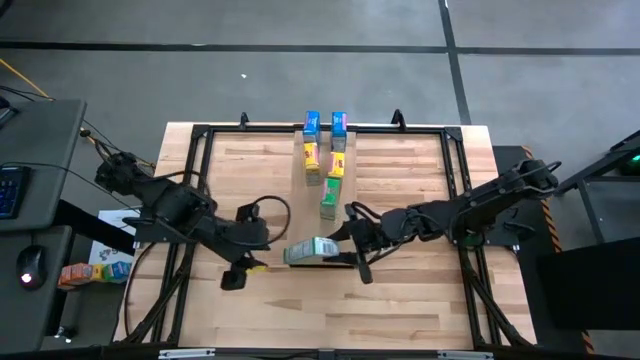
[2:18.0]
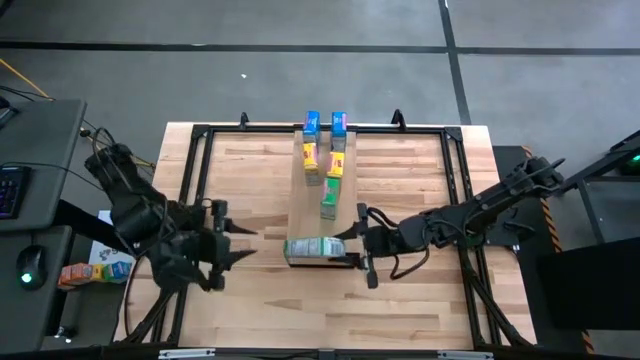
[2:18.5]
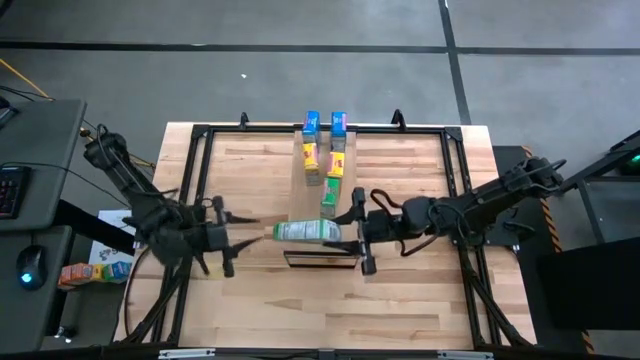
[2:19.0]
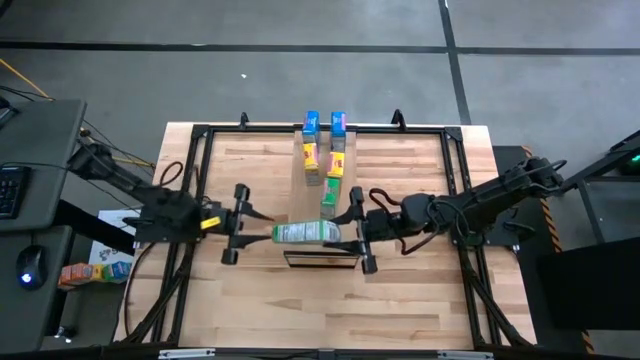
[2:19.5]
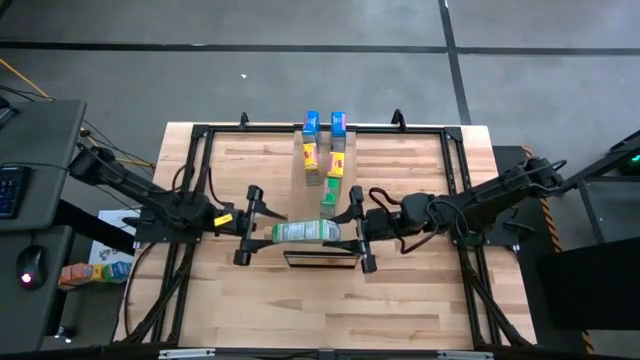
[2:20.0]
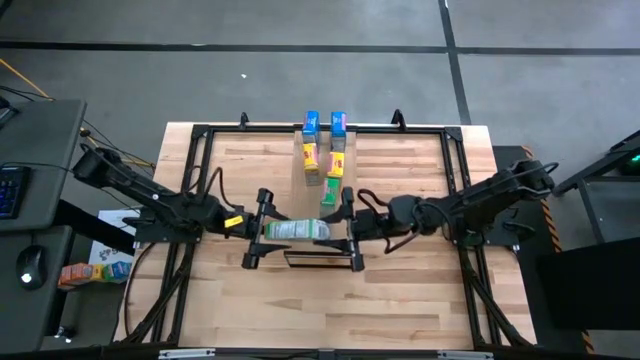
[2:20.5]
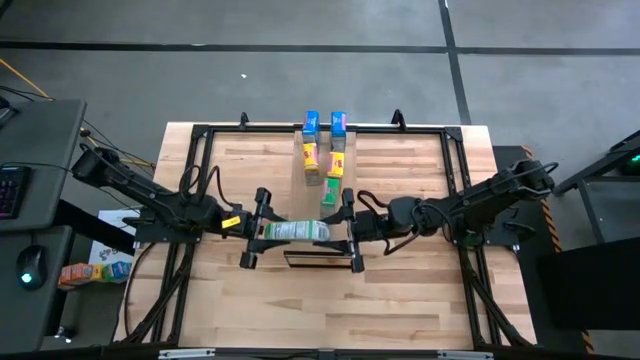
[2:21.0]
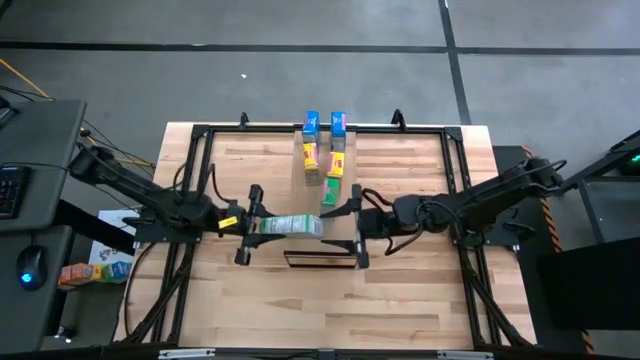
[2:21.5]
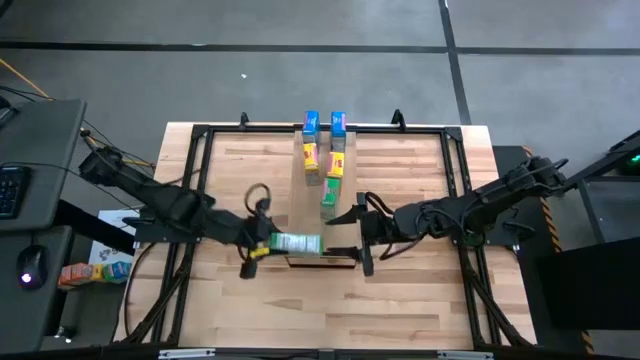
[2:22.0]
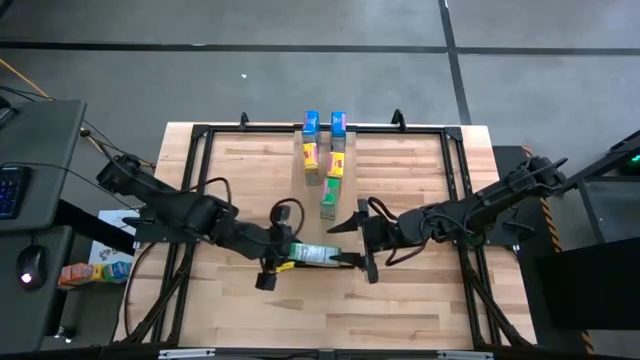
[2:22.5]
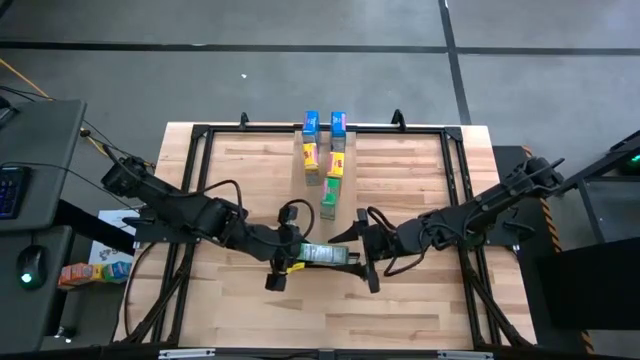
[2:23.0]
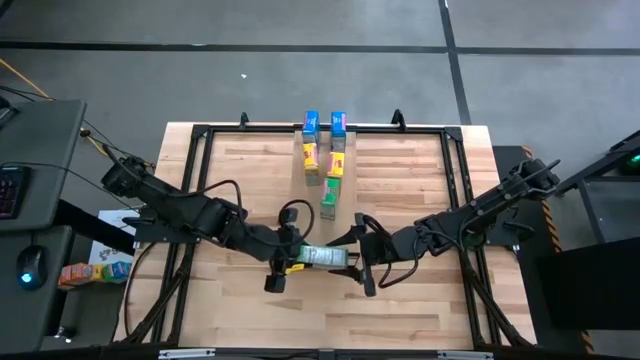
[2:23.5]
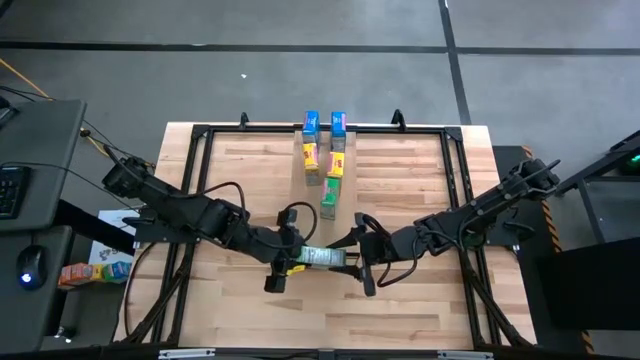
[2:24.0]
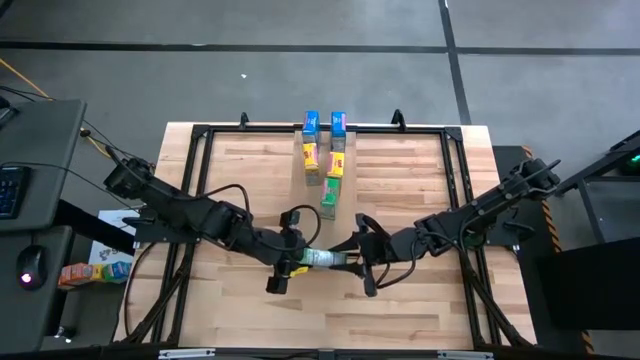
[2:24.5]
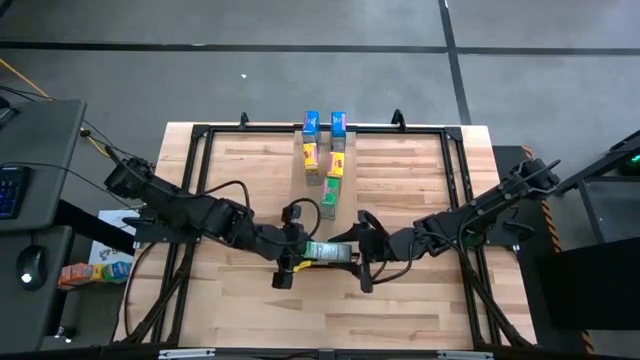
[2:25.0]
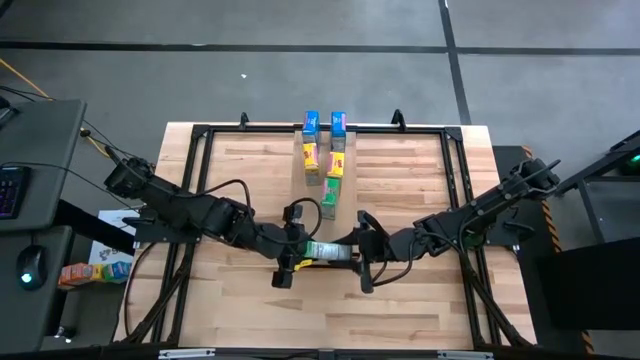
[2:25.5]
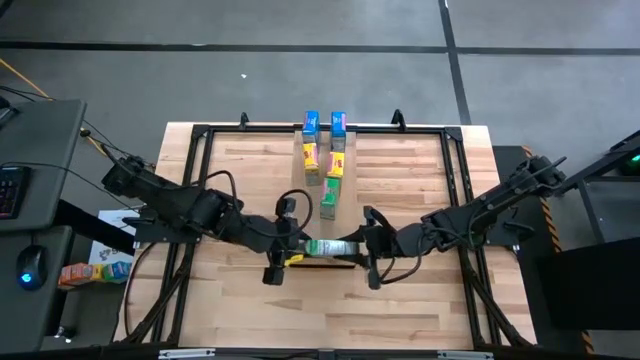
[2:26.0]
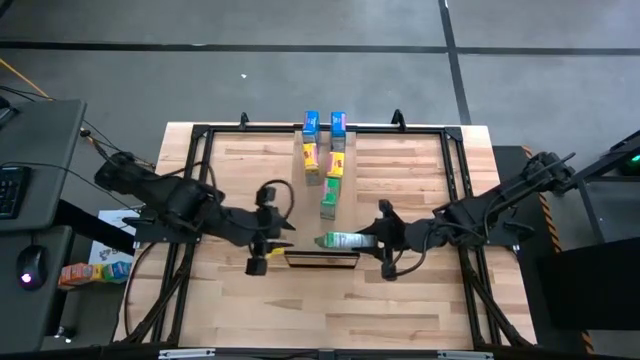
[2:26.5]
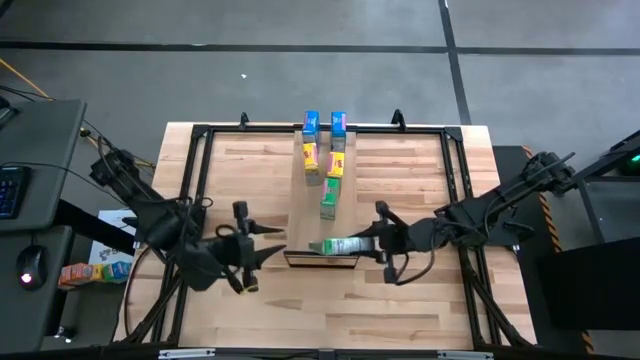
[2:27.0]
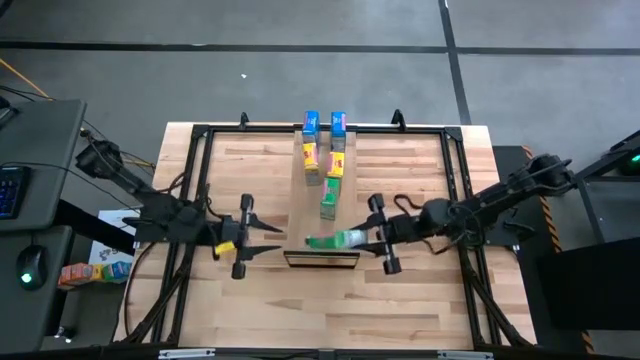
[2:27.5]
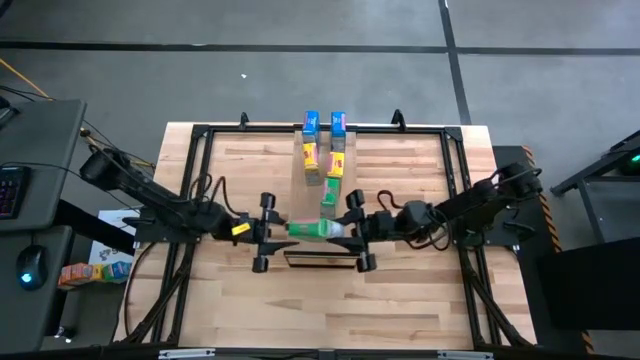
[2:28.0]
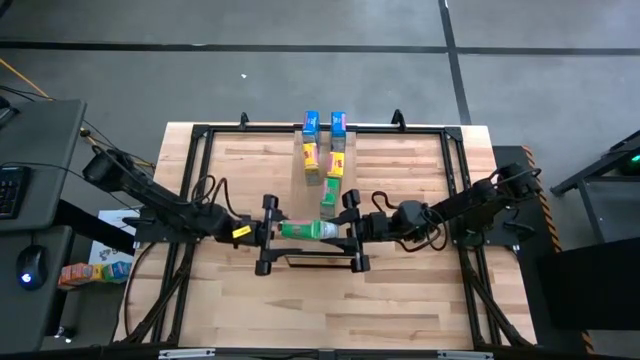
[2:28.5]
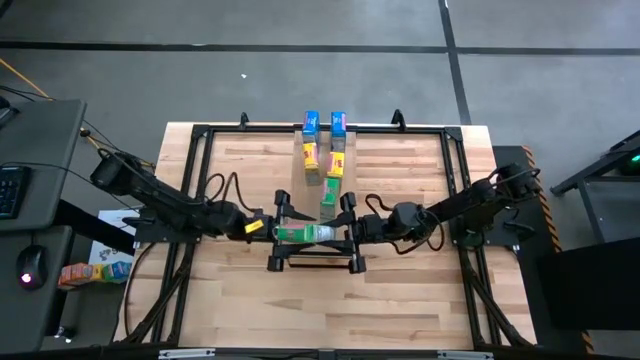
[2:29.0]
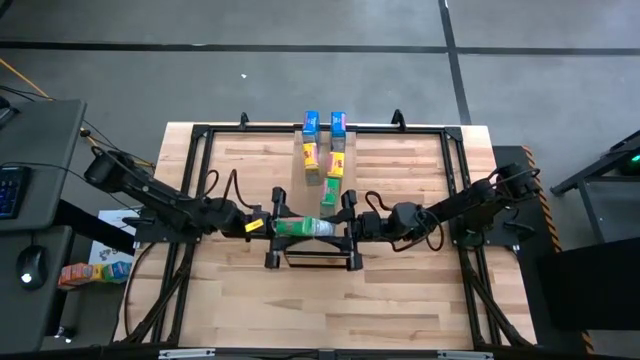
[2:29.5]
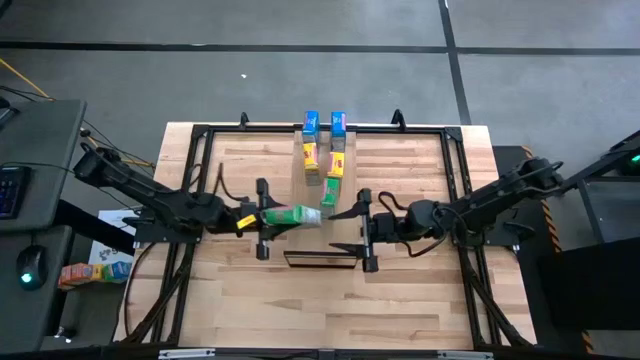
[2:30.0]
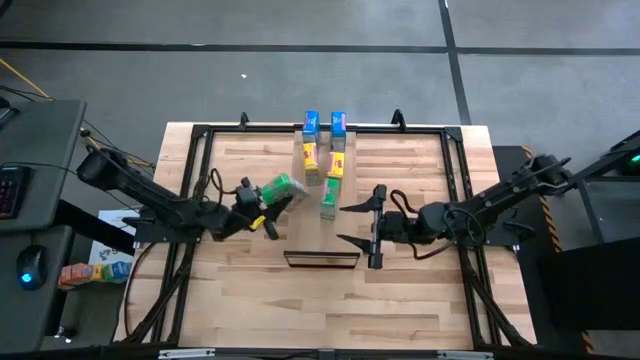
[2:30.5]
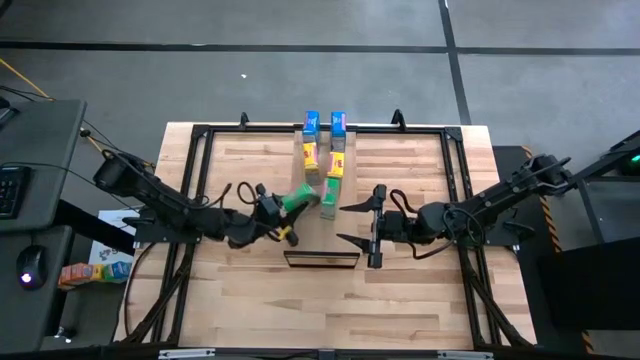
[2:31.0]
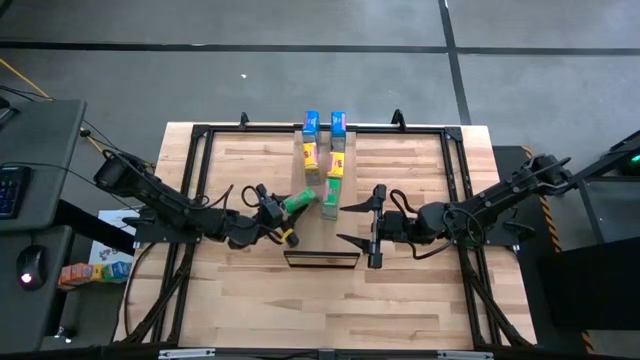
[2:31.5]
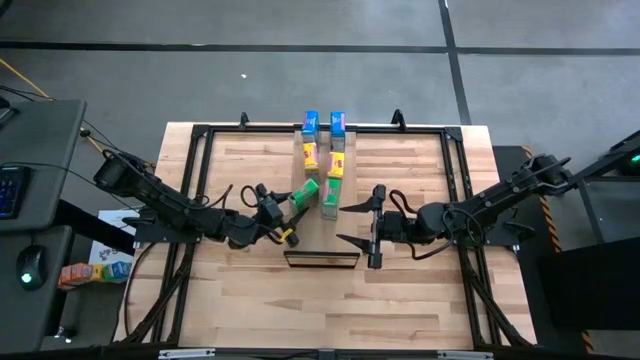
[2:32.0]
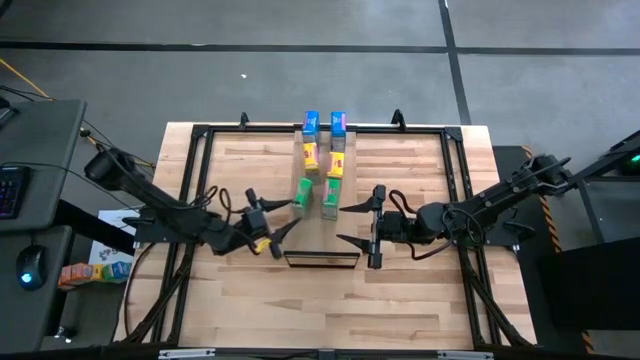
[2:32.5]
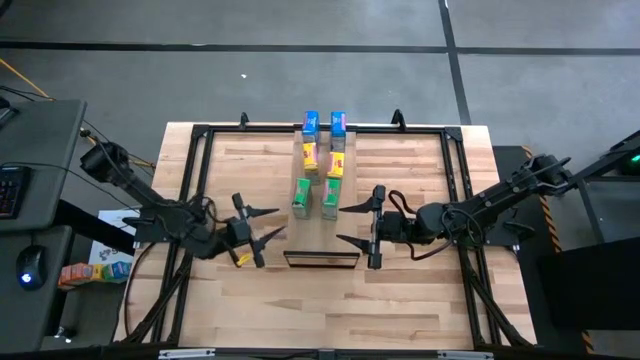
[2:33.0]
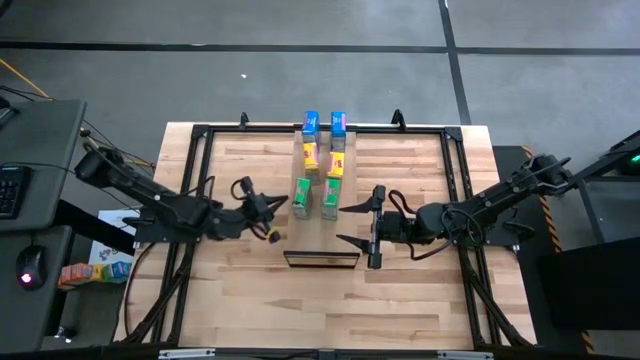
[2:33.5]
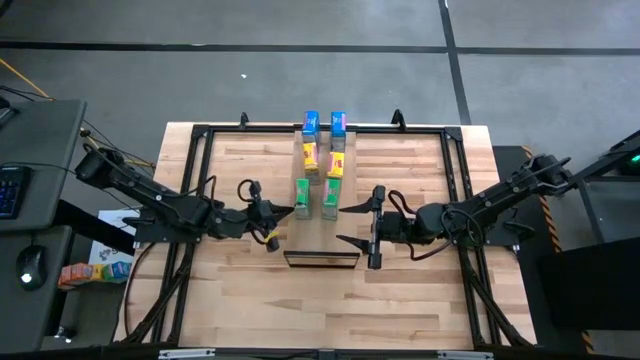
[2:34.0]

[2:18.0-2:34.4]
Task: Stack cereal on shelf
Put the green cereal box on the shelf

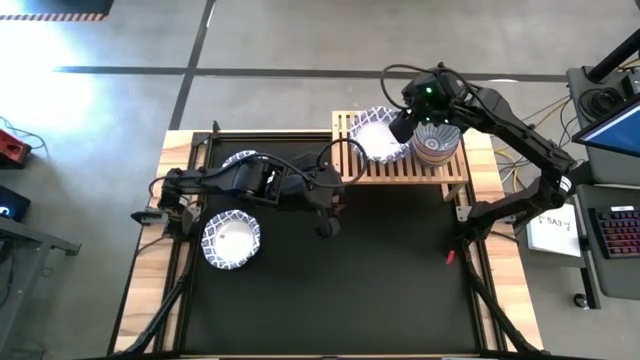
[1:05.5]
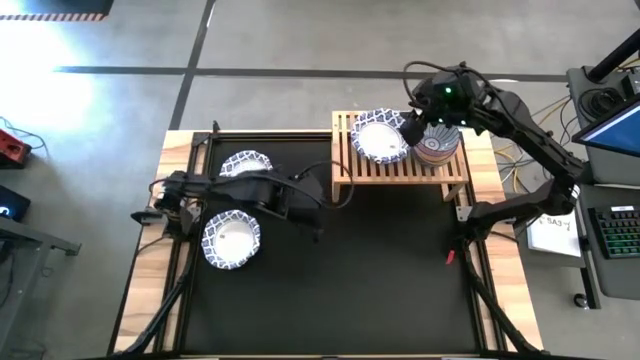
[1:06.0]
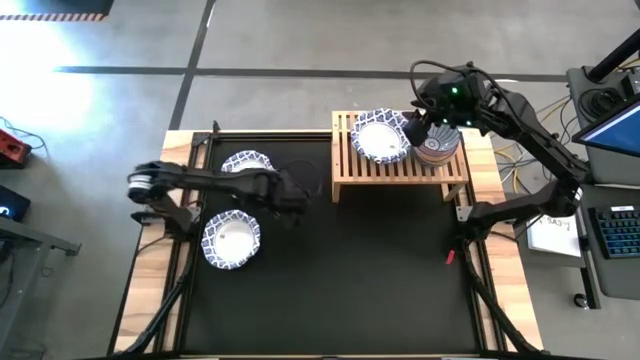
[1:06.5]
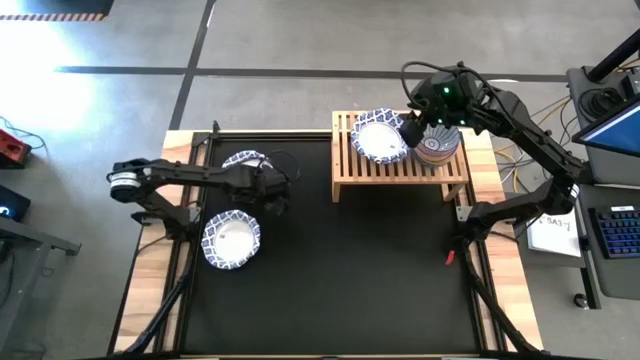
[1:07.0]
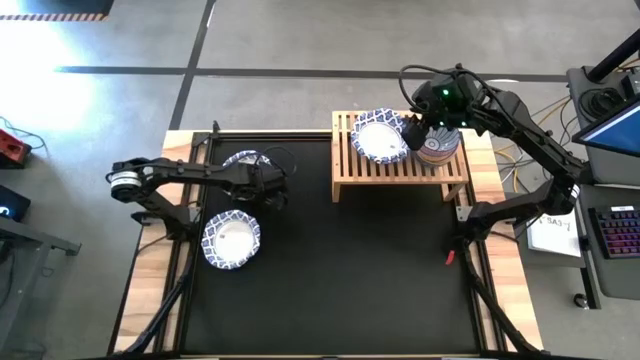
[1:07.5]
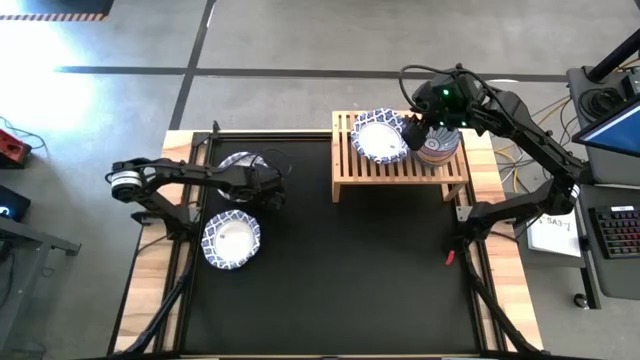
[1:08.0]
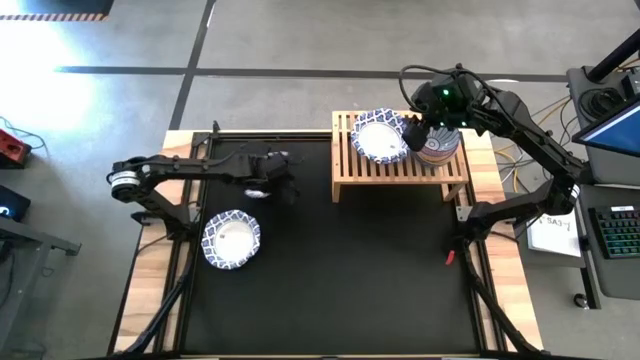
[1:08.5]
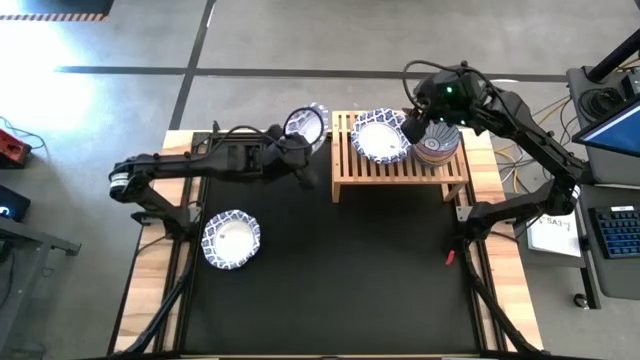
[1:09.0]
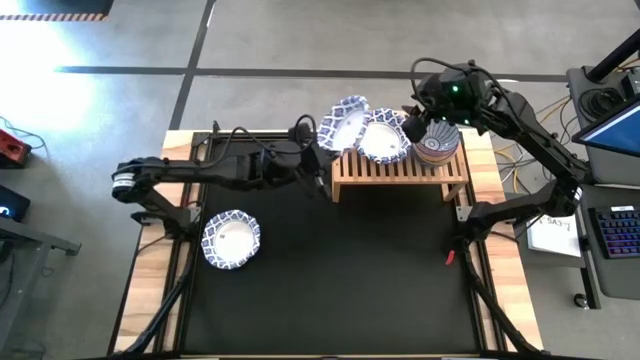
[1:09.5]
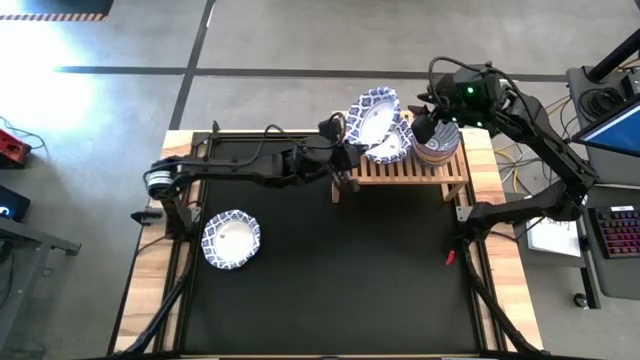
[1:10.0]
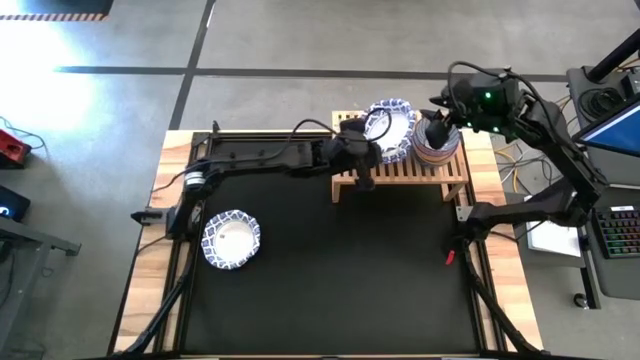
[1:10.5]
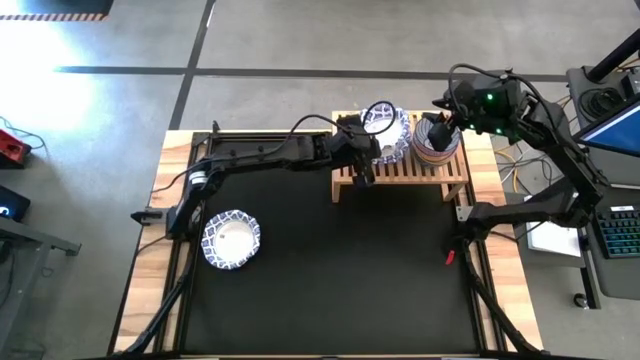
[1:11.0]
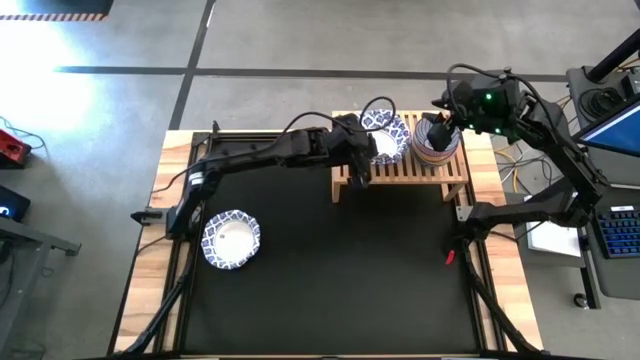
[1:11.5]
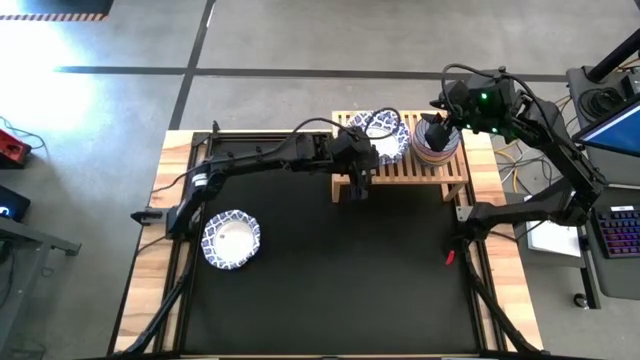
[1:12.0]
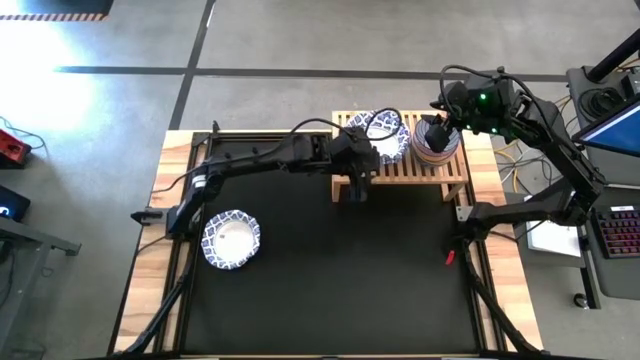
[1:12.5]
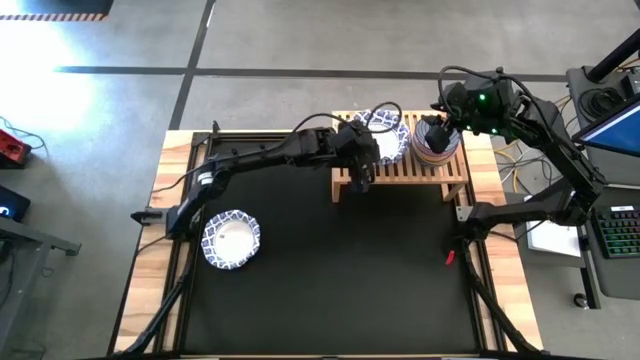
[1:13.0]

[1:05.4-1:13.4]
Task: Place and stack bowls onto a shelf
Stack the white bowl on top of the other white bowl on the shelf
